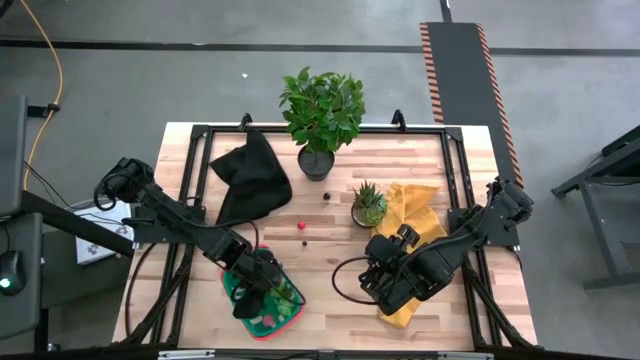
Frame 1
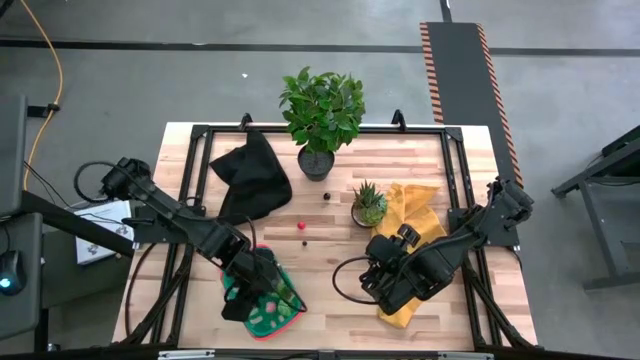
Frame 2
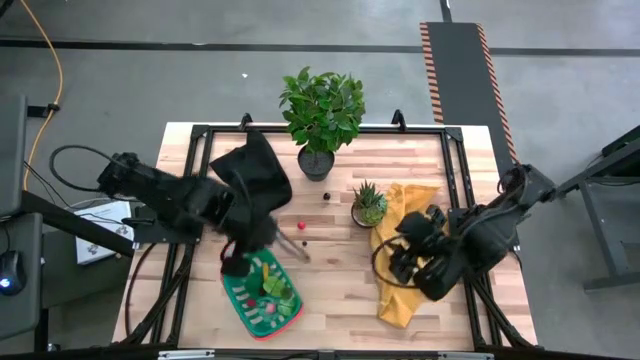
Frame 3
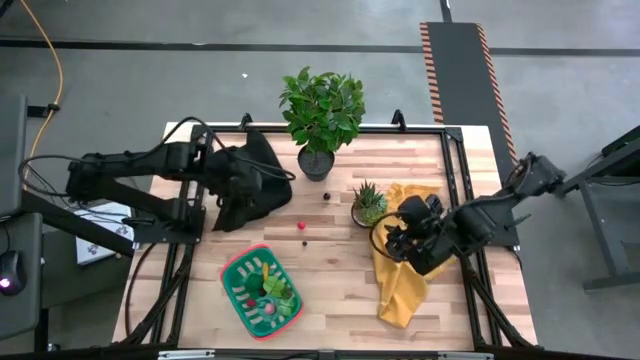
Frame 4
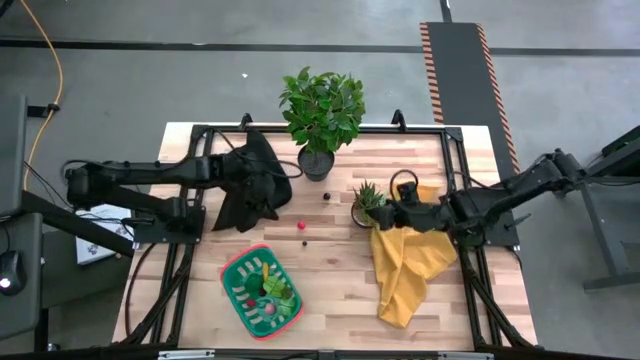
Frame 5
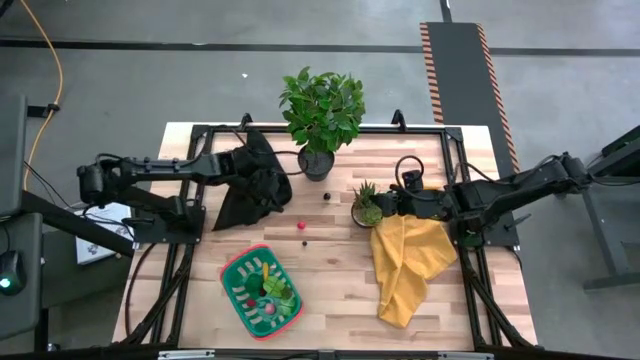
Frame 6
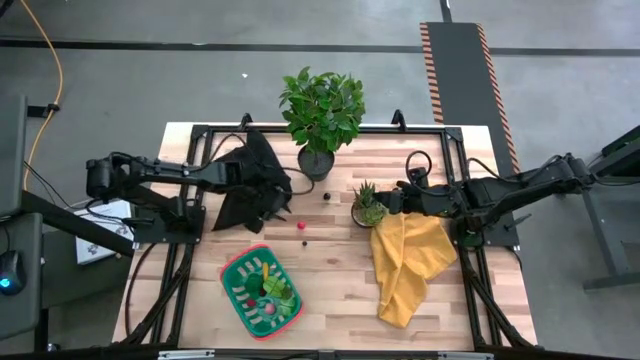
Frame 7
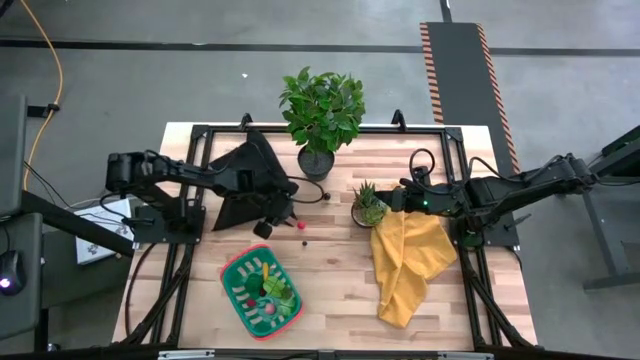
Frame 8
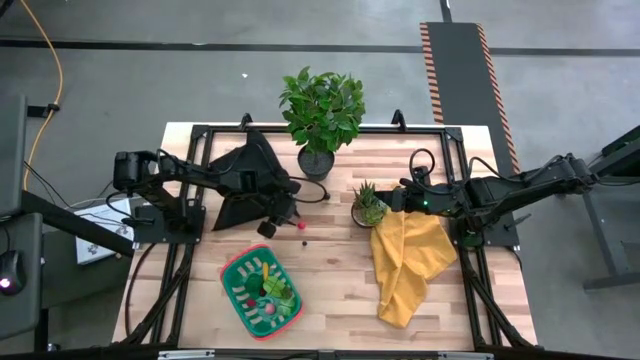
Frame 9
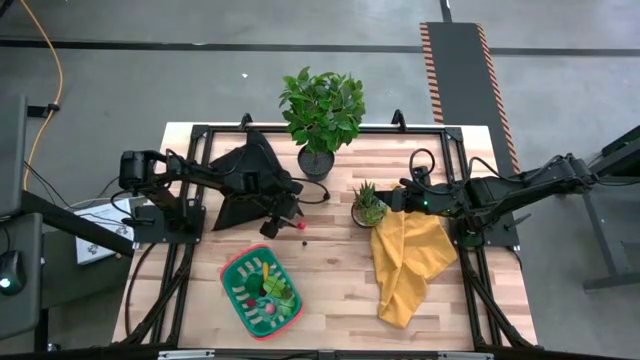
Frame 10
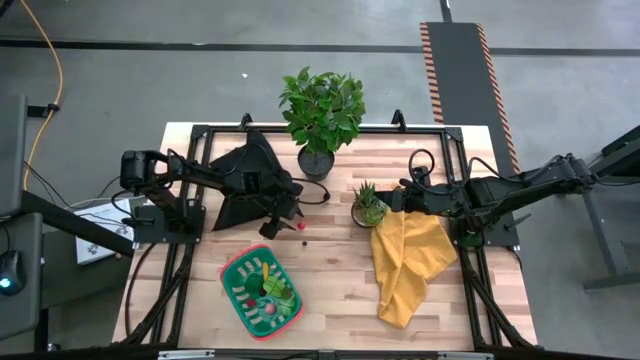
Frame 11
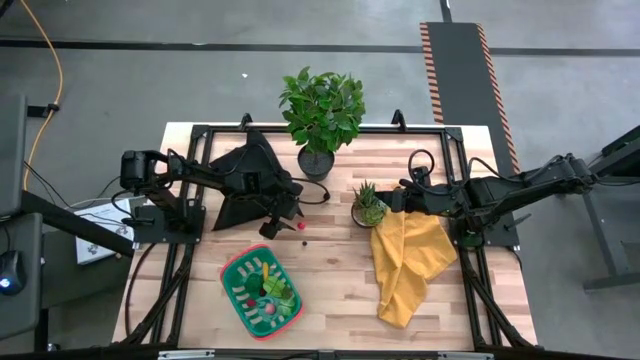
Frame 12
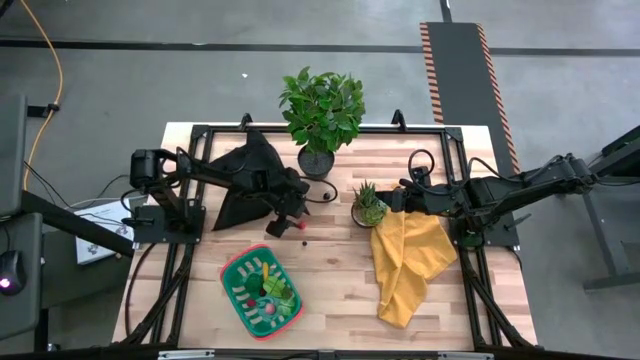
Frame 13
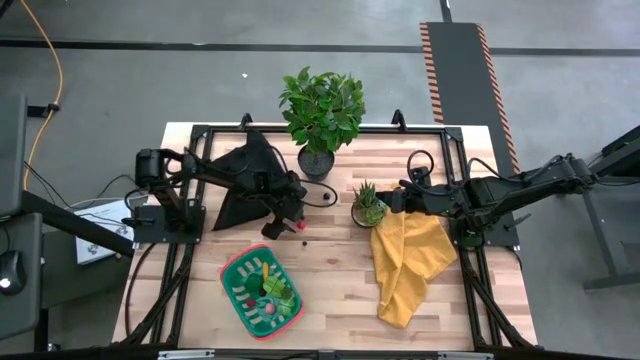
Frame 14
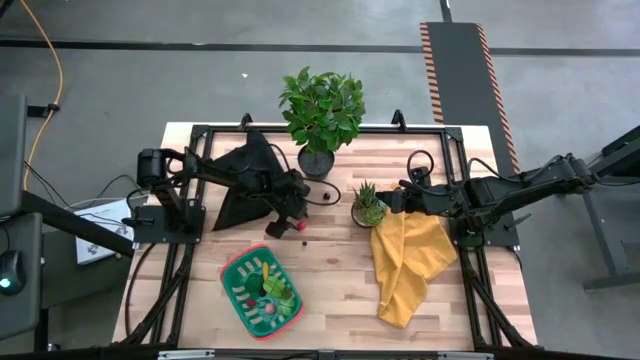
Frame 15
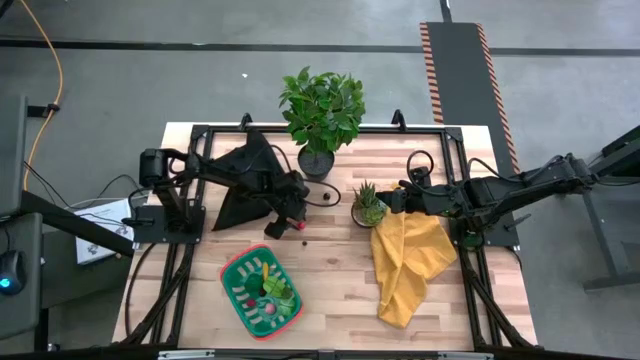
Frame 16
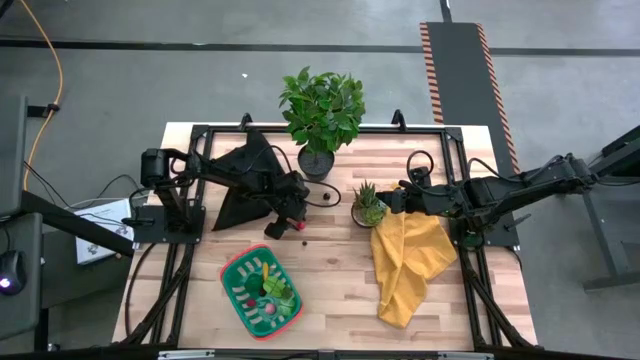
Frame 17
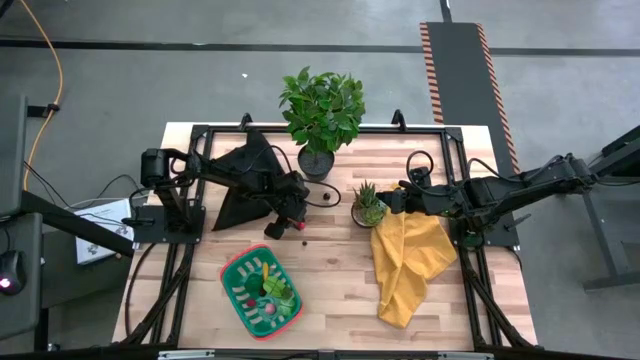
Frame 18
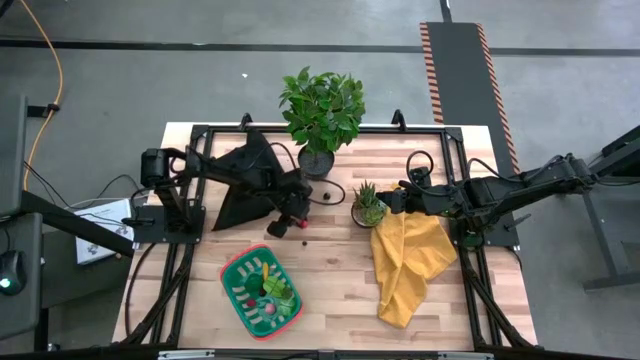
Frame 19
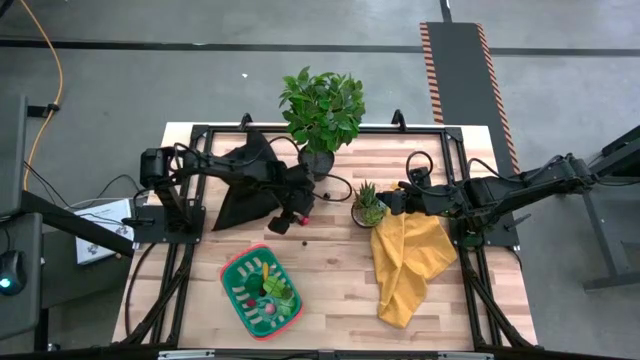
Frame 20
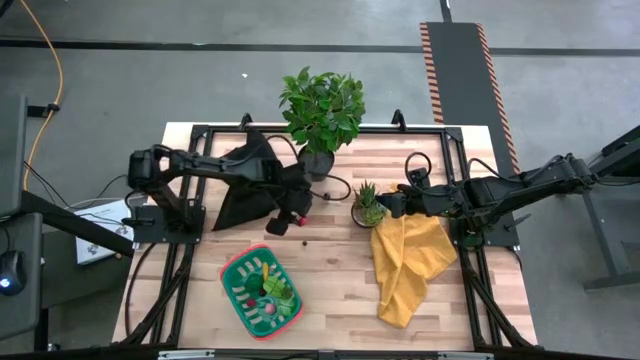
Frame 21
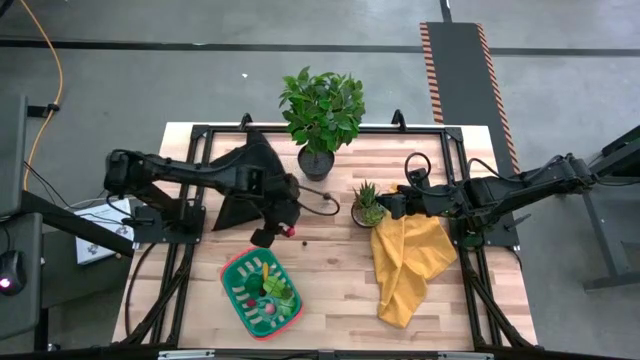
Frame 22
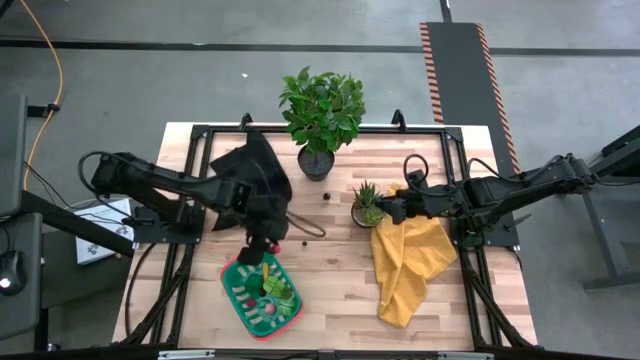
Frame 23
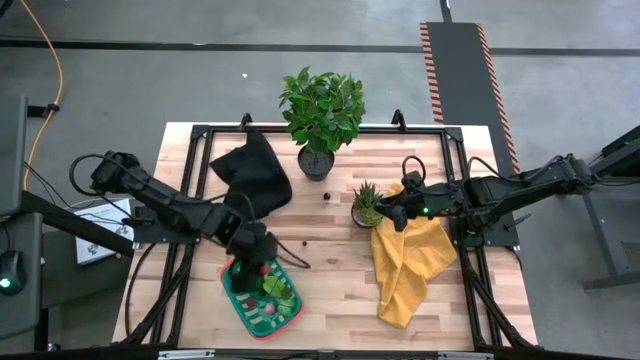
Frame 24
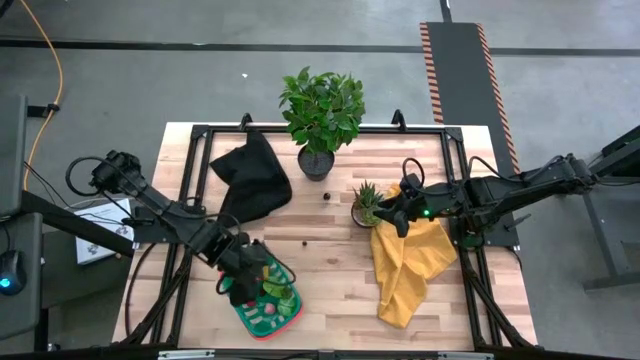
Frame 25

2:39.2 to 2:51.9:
Task: Pick and placing Produce into tupperware
Put the red cherry into the blue basket

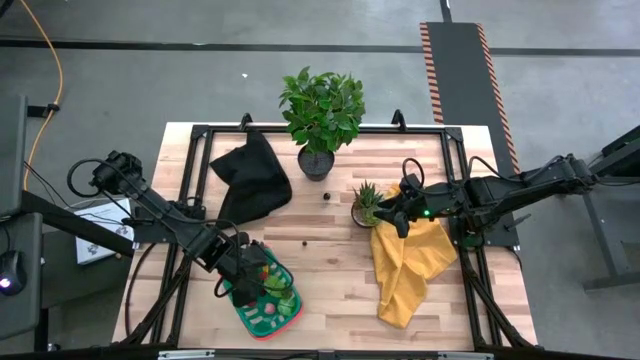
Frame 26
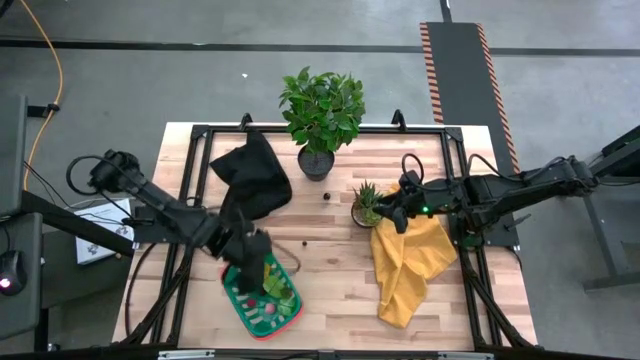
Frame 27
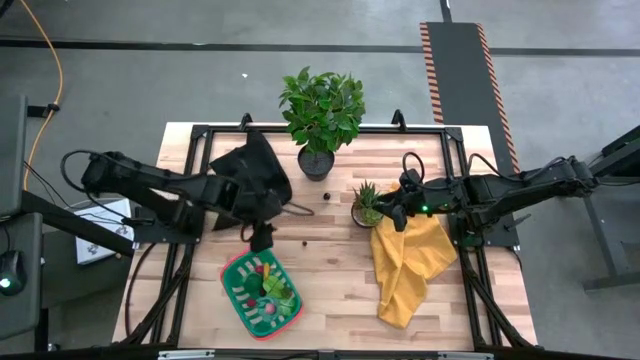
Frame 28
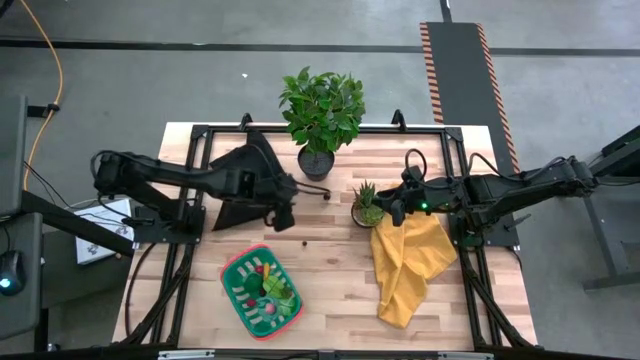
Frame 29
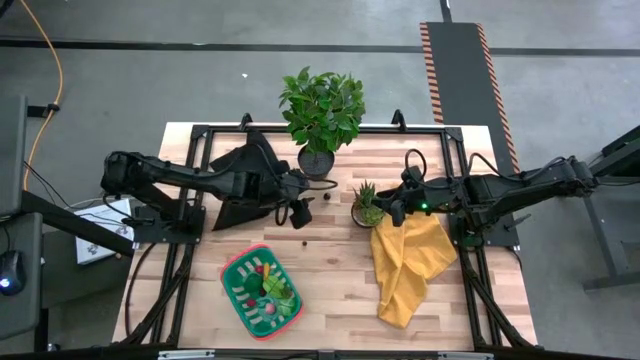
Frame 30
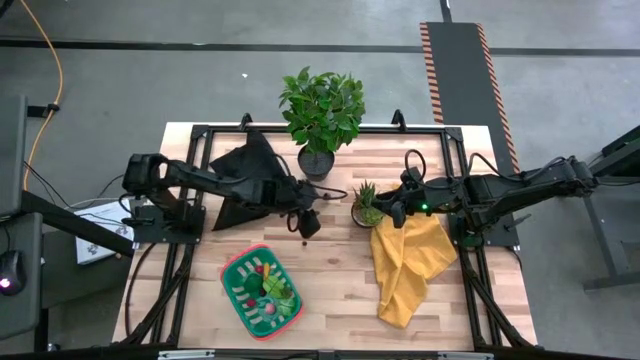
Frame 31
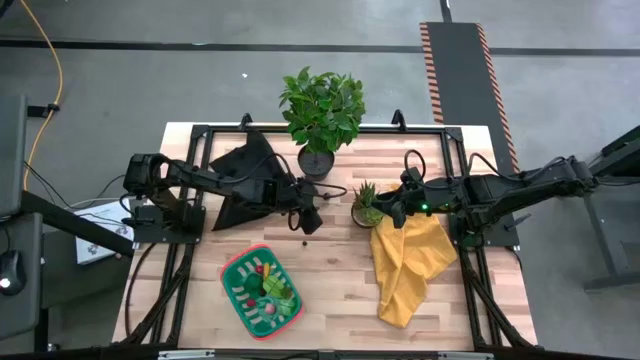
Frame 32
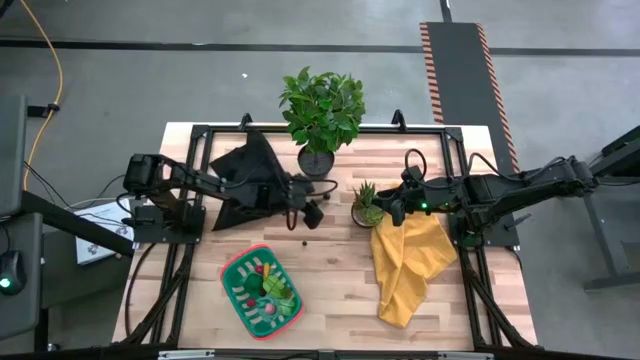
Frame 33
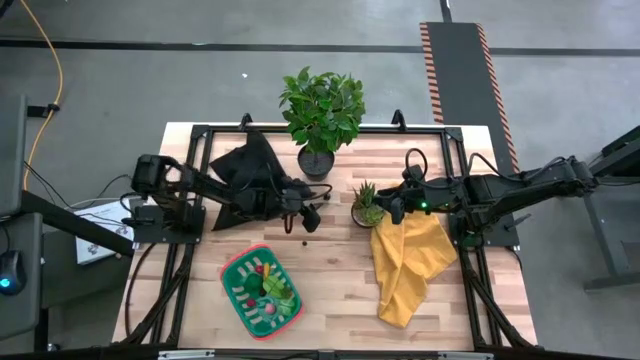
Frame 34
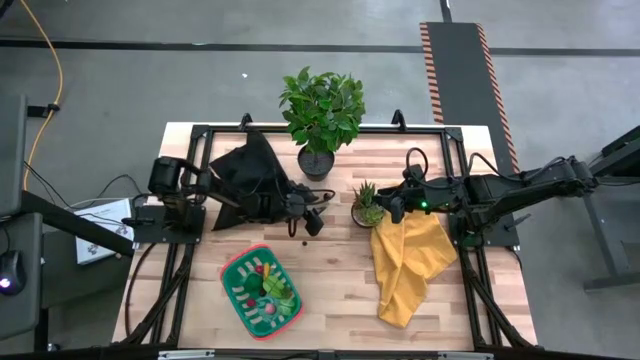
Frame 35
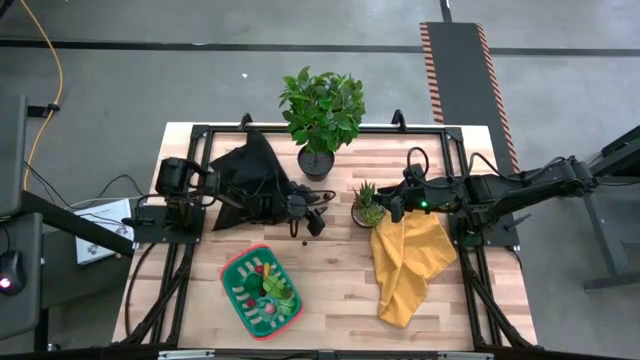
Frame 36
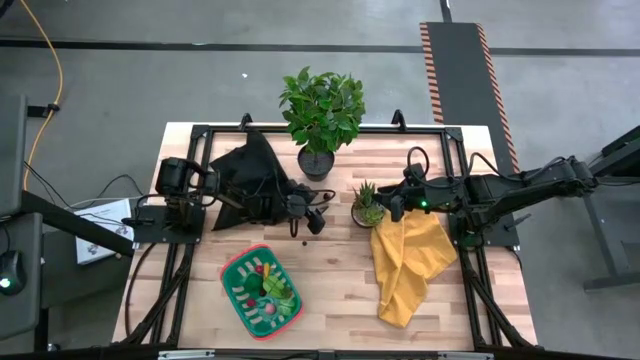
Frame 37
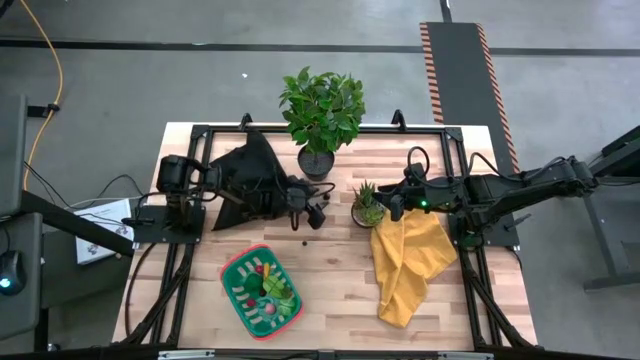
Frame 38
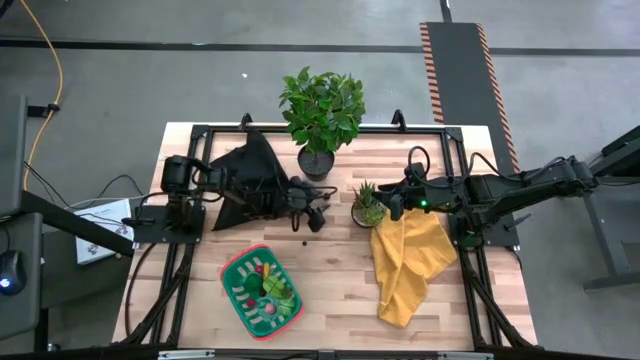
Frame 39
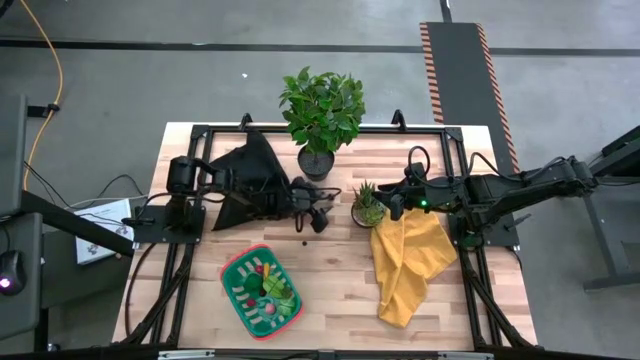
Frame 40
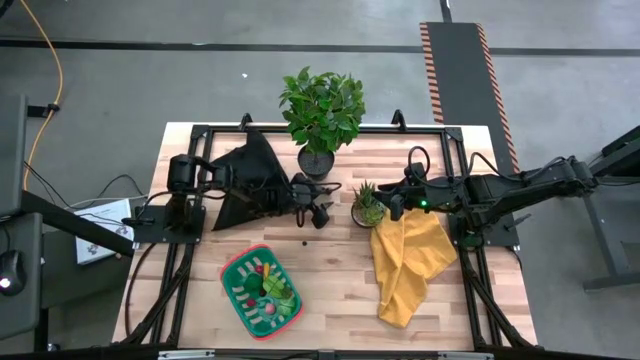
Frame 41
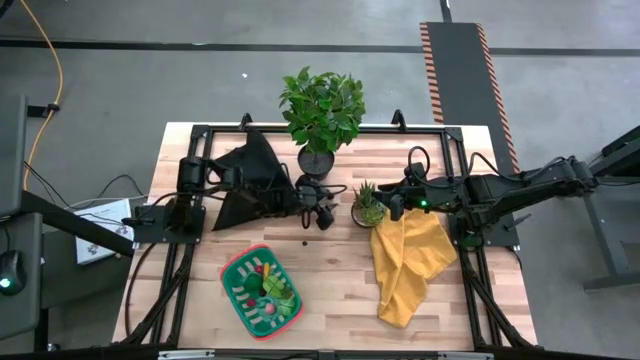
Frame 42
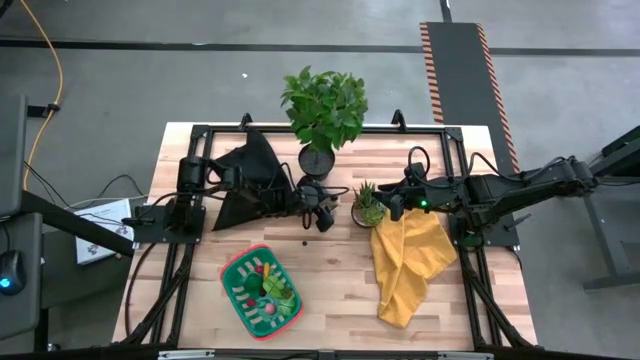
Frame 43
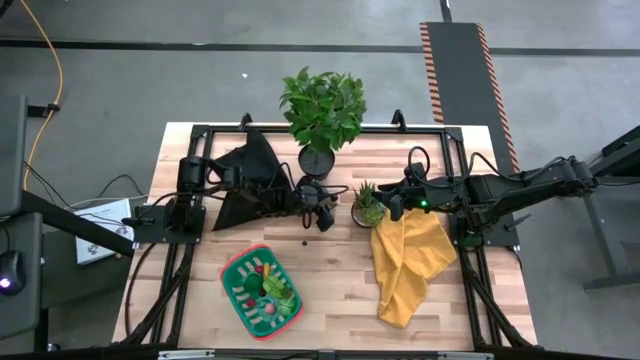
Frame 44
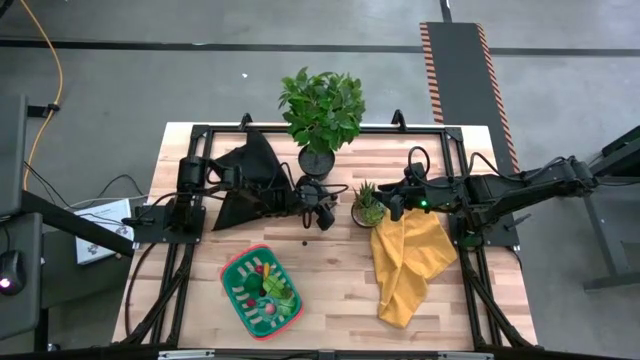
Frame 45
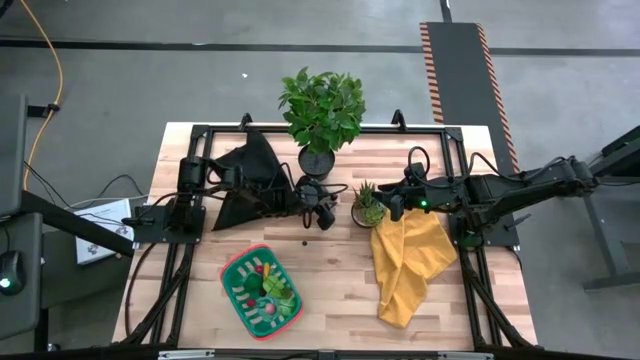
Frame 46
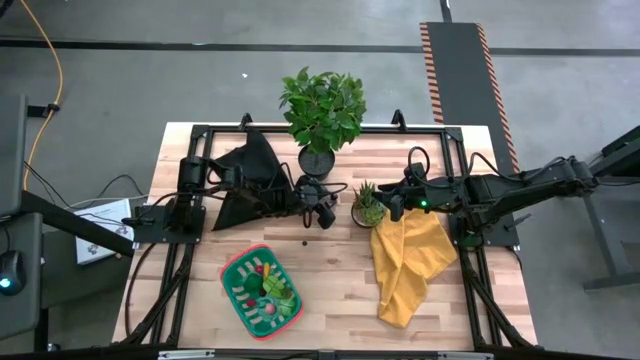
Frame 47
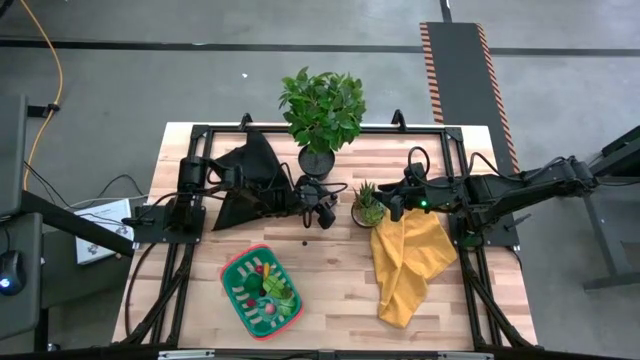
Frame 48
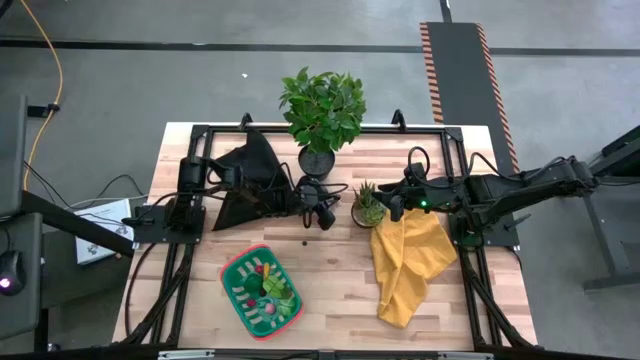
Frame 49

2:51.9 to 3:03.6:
Put the black cherry into the blue basket
